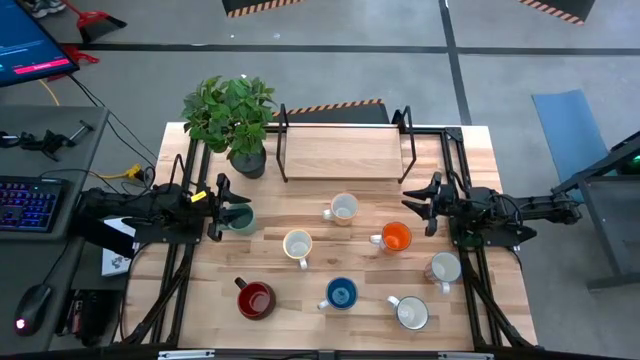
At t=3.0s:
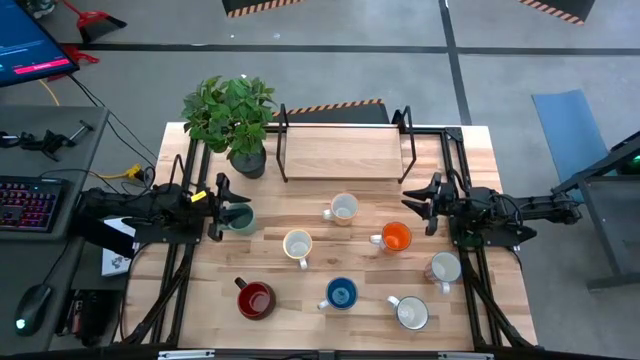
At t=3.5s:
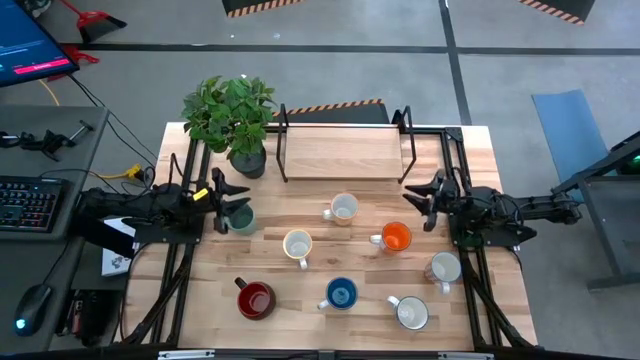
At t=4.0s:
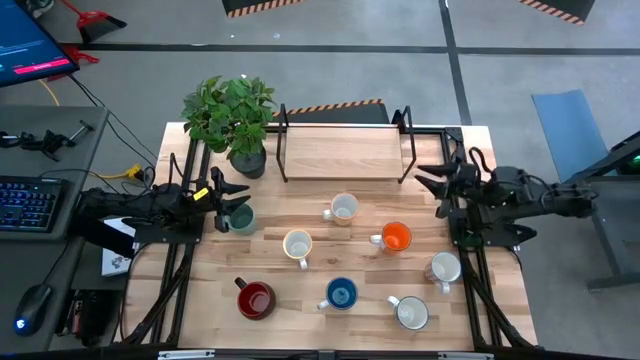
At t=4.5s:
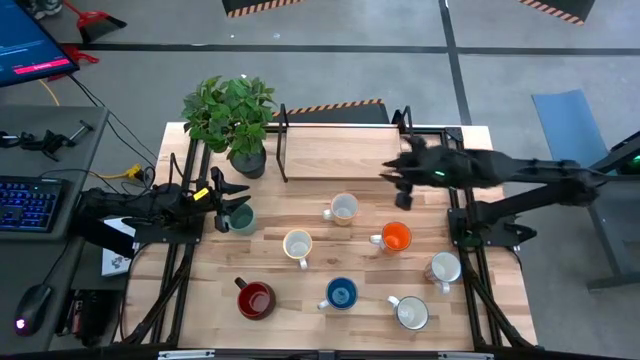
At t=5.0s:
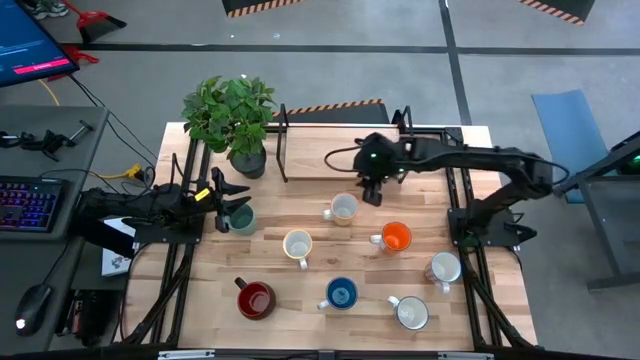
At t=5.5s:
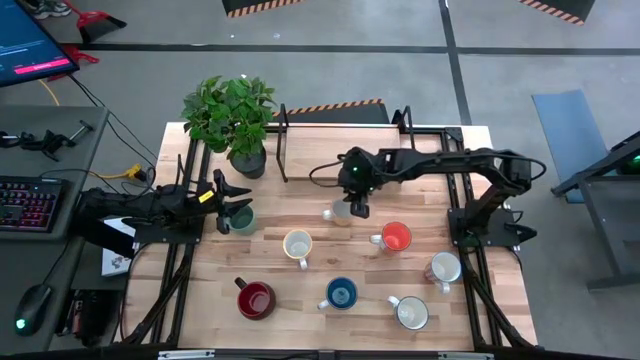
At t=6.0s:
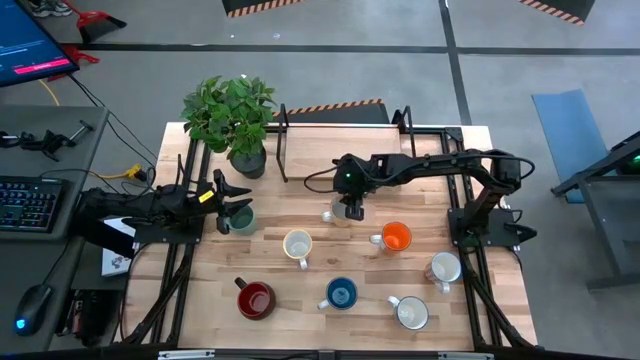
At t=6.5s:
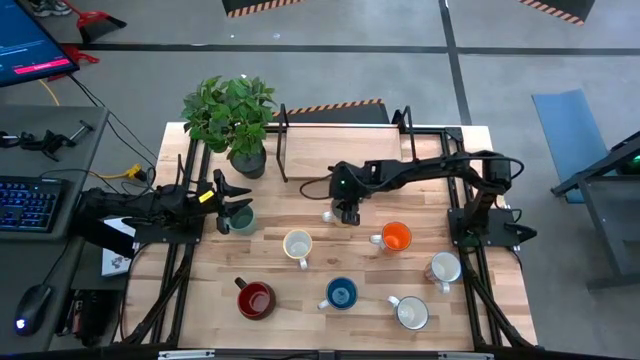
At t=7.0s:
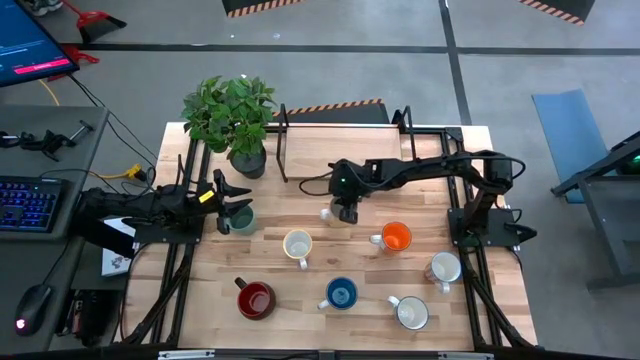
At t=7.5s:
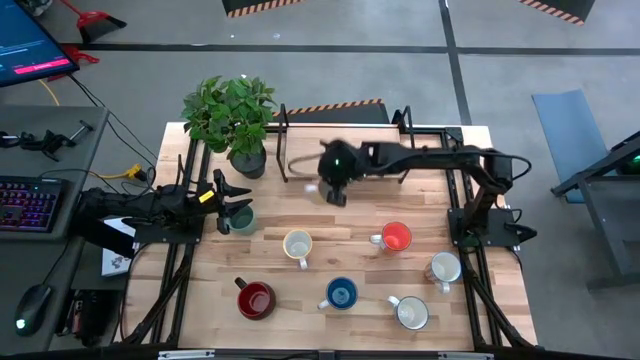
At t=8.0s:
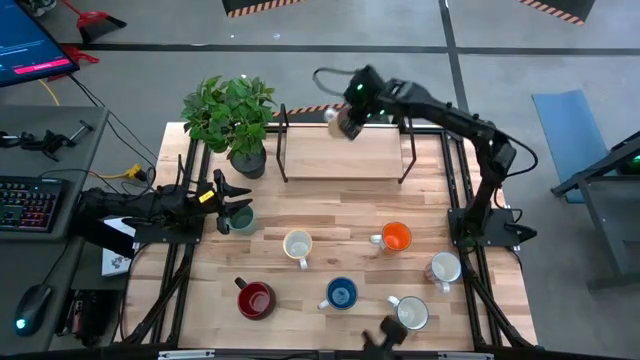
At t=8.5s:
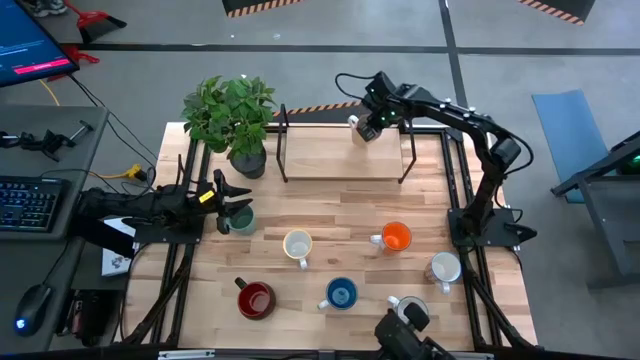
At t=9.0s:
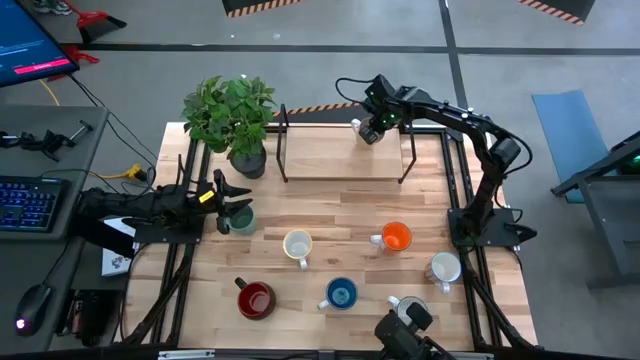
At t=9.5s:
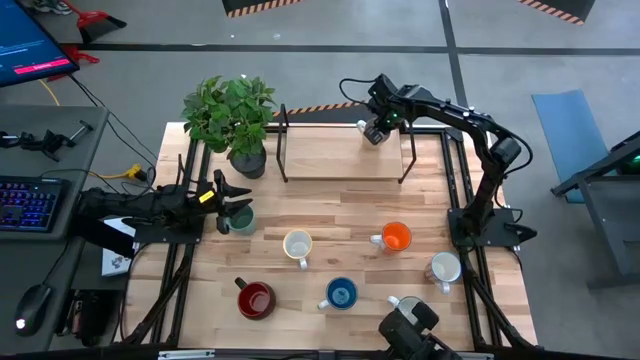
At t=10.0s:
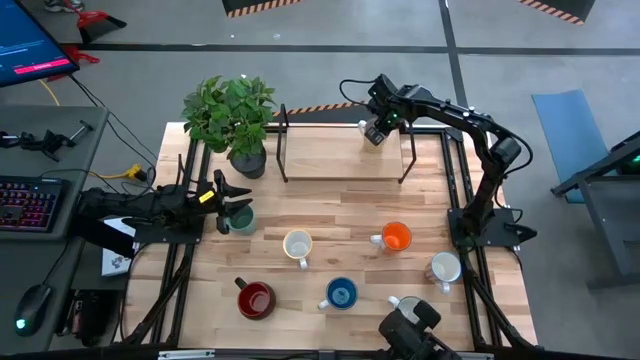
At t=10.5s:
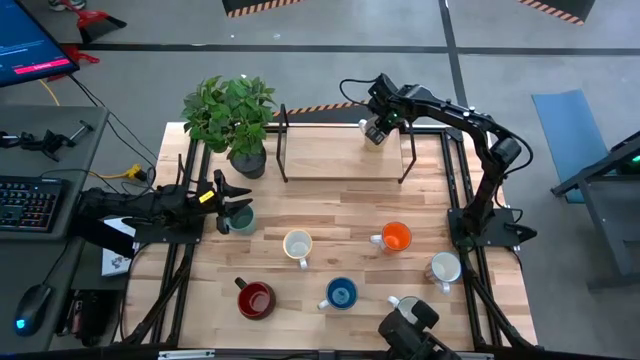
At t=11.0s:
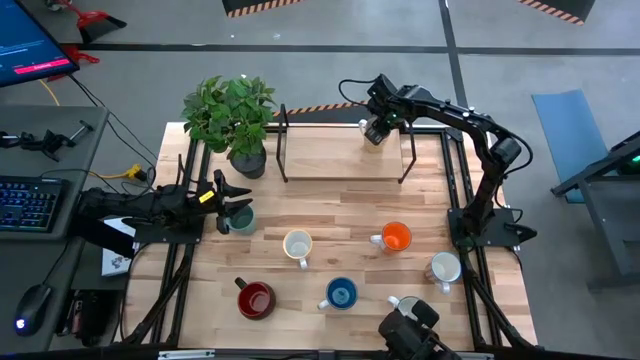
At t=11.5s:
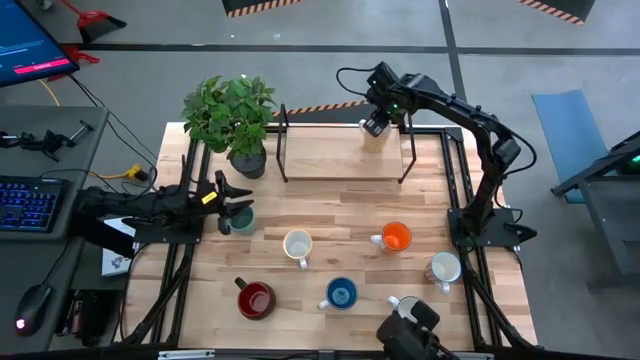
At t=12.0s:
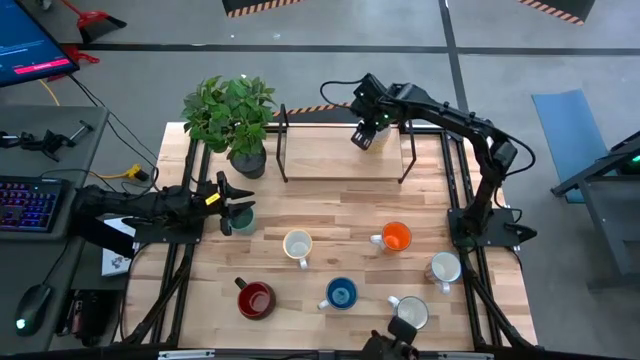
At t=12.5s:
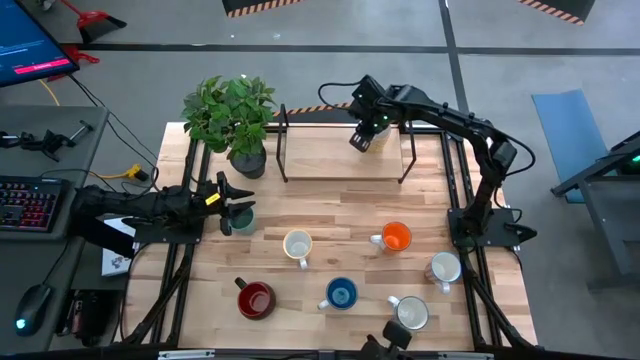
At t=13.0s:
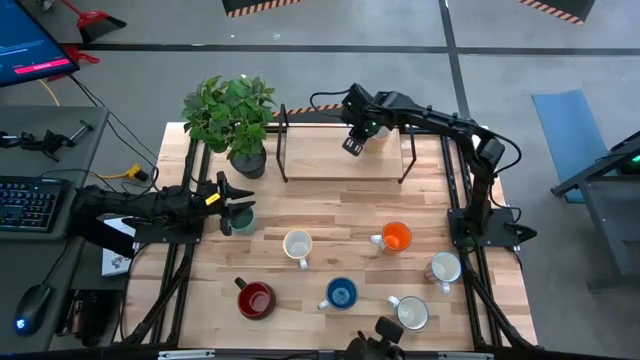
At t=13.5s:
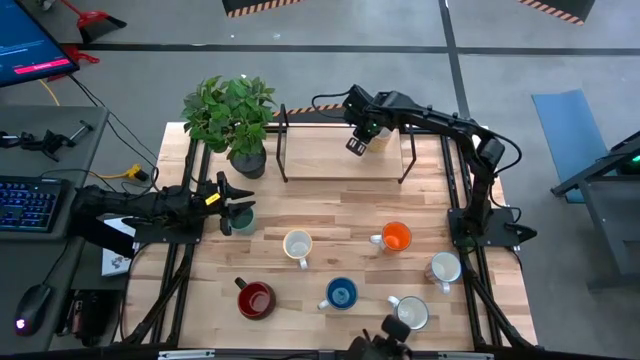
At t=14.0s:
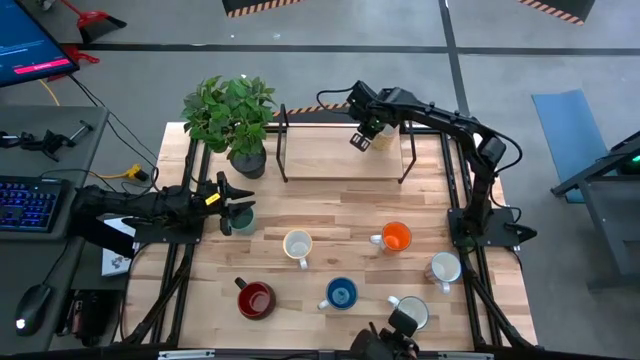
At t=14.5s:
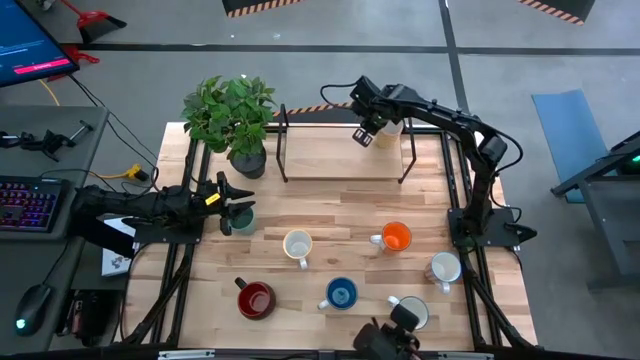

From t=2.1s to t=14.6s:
Task: Place coffee mugs
Put the patterned yellow mug on the shelf

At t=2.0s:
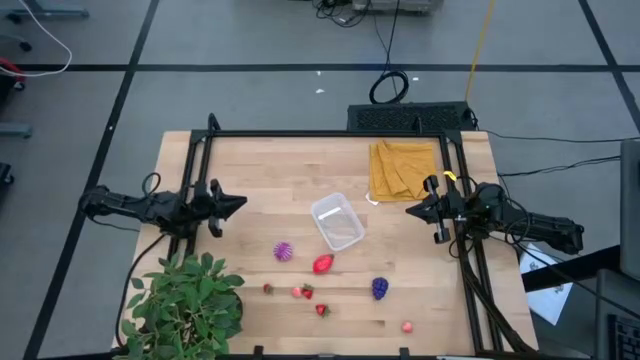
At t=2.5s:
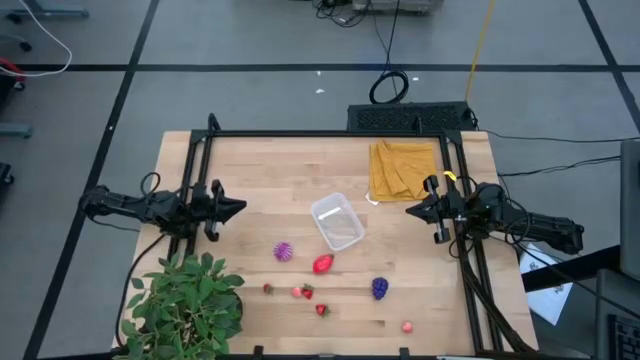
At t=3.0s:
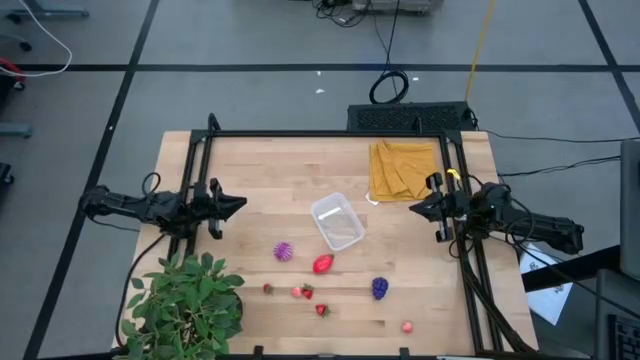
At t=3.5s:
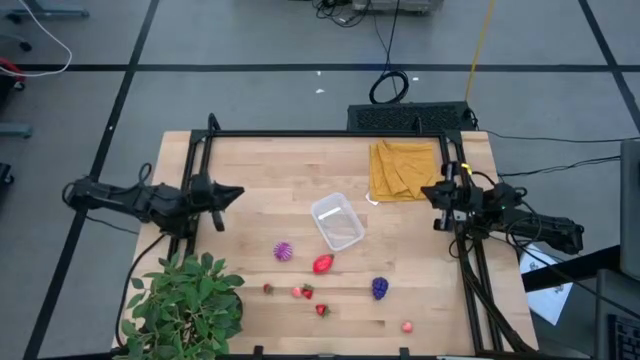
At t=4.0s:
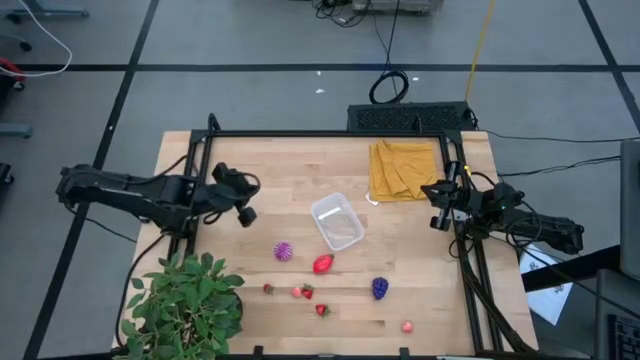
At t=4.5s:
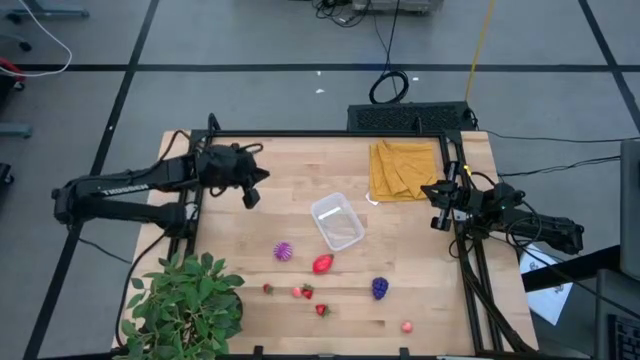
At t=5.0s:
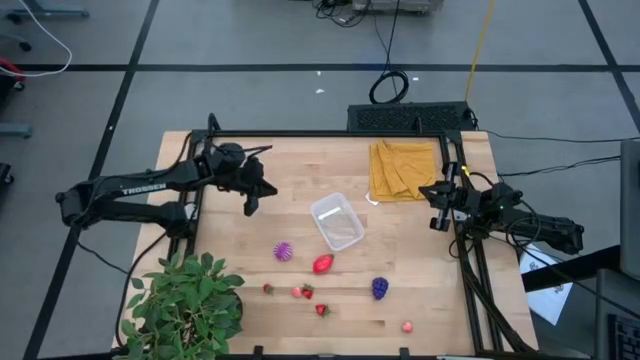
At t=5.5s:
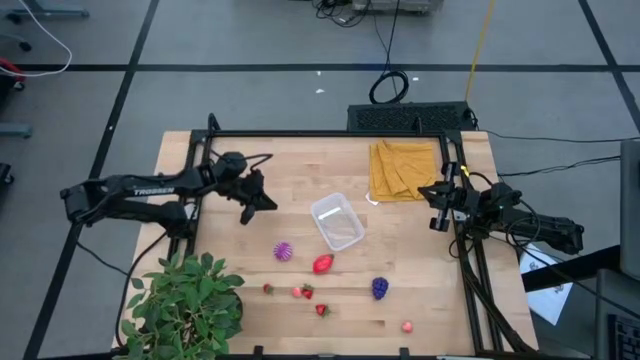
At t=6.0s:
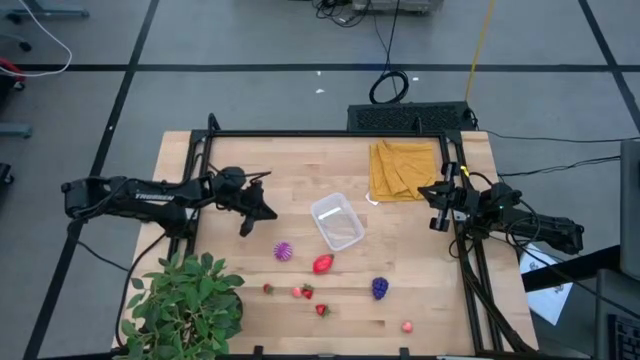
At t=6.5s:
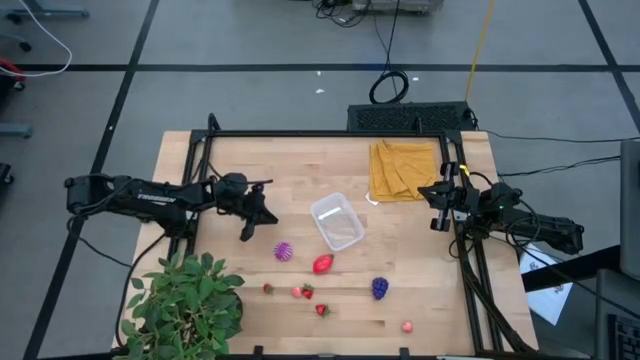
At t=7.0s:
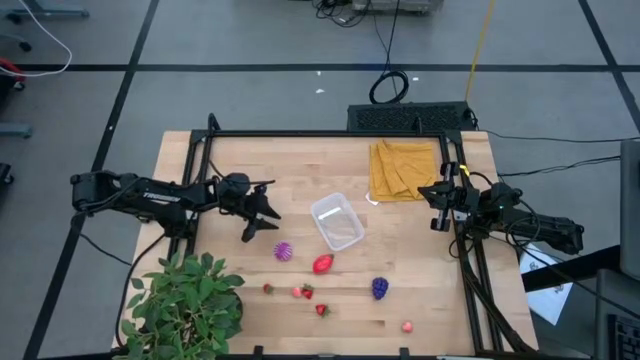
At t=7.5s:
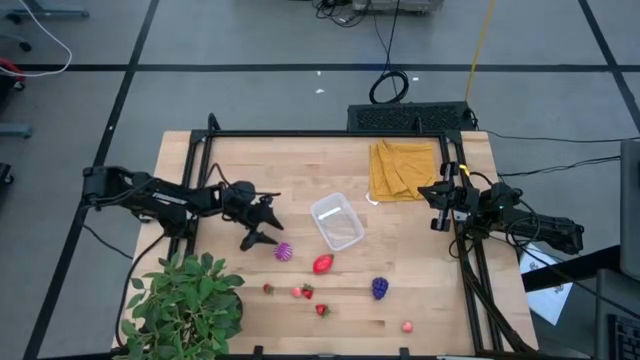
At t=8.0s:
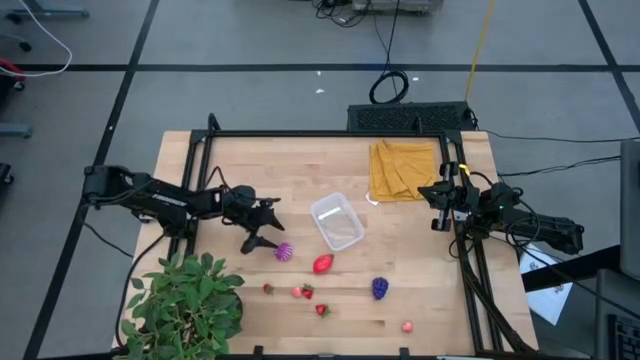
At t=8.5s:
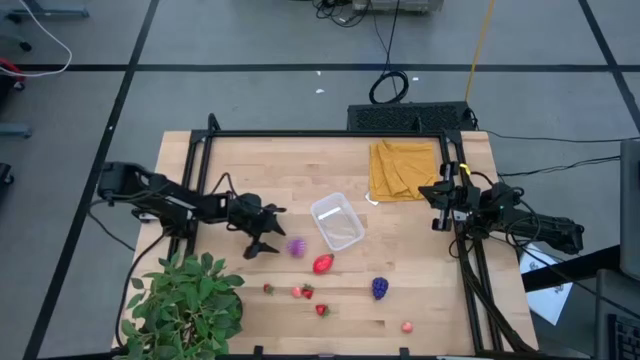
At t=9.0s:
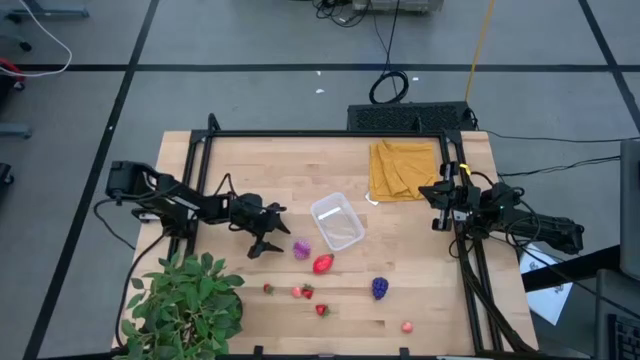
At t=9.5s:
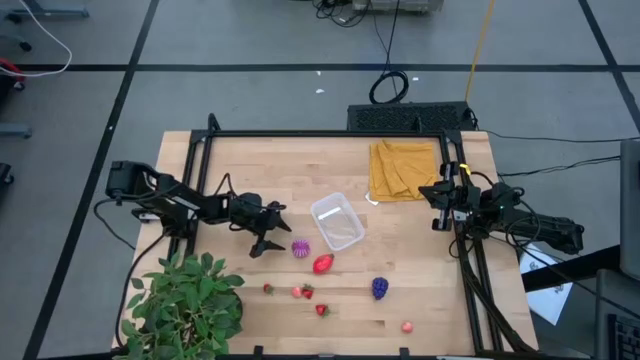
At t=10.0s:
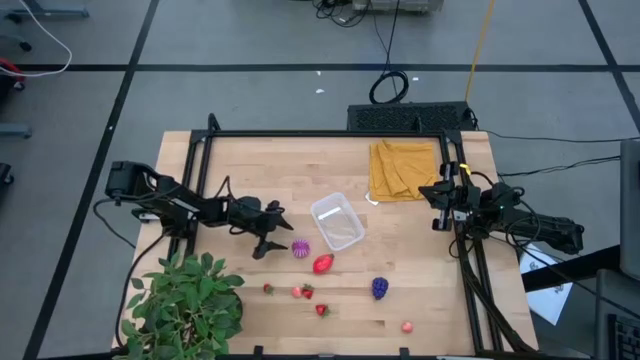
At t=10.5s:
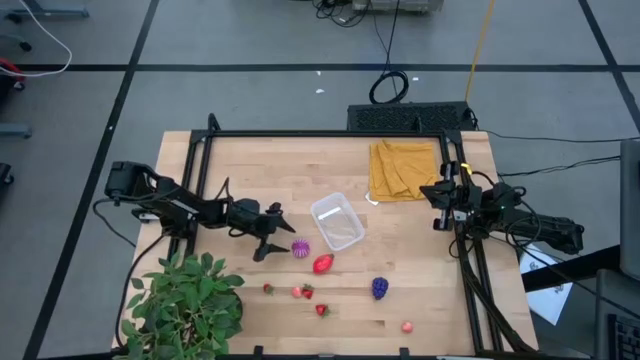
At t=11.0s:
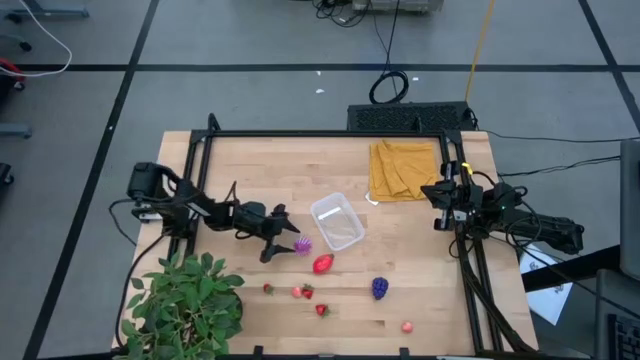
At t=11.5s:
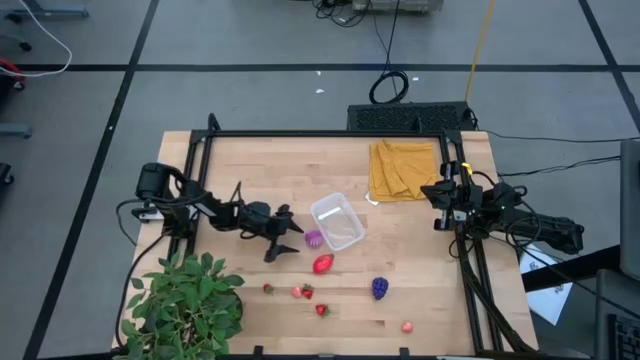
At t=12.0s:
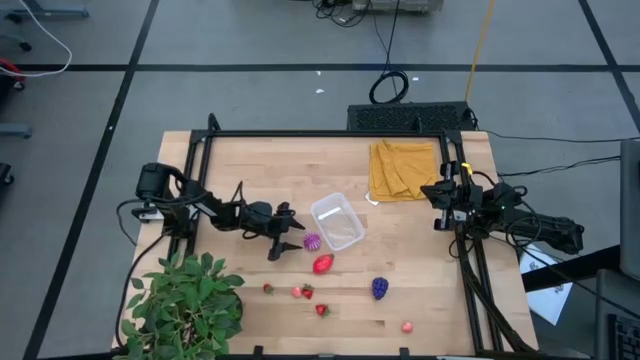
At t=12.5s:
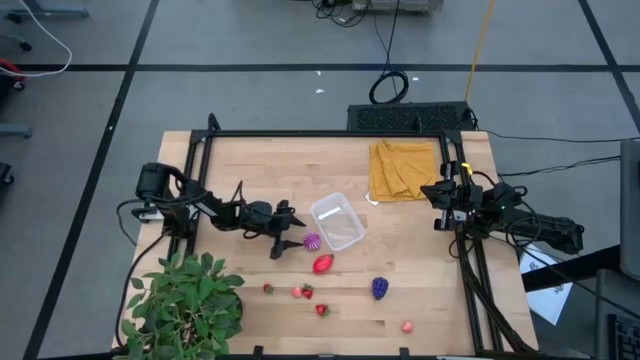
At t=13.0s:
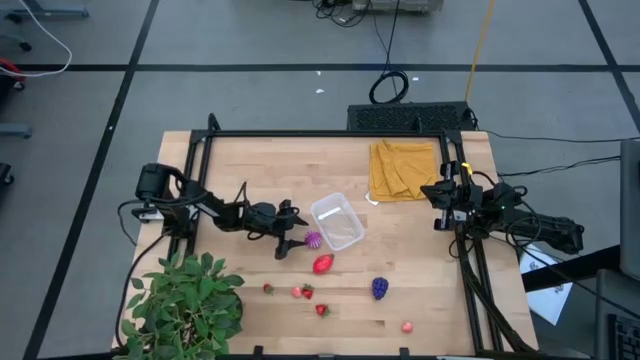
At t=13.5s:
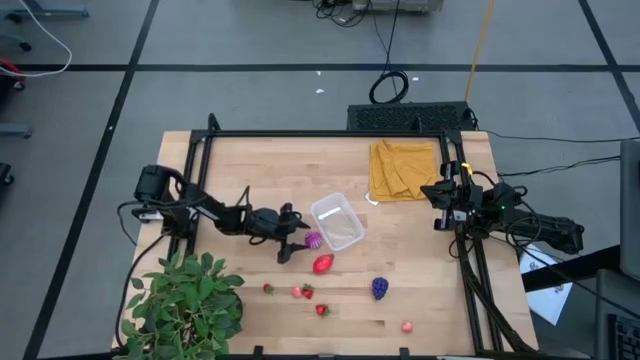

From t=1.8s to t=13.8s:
Task: Pick and placing Produce into tupperware
Put the violet onion into the transparent container
